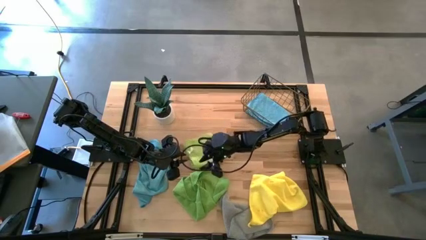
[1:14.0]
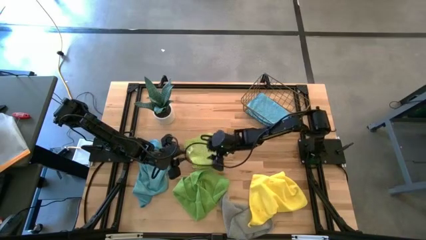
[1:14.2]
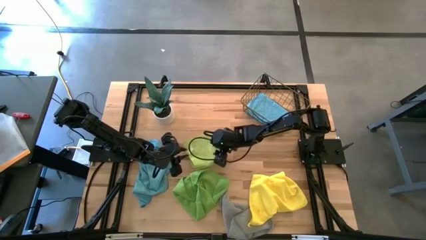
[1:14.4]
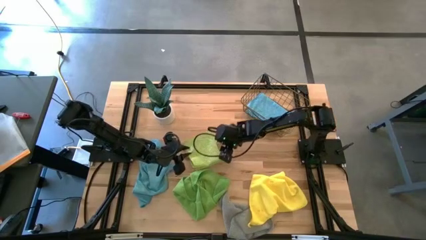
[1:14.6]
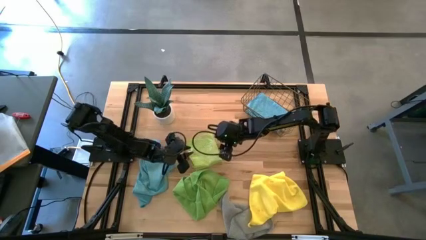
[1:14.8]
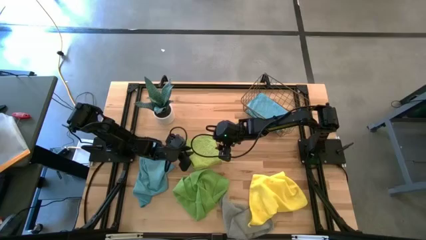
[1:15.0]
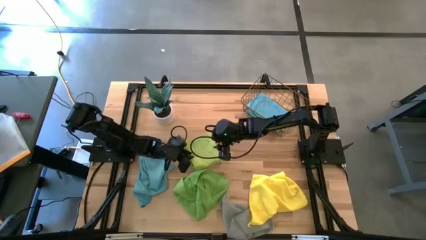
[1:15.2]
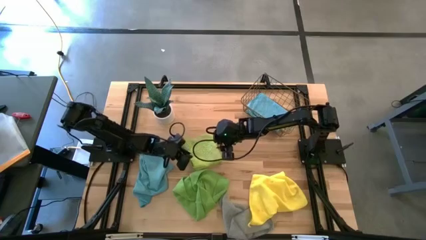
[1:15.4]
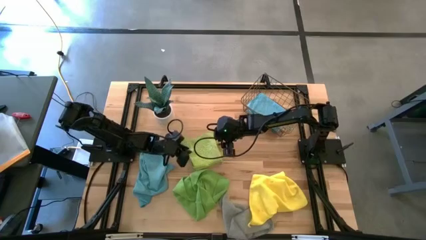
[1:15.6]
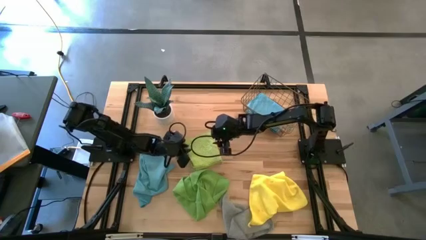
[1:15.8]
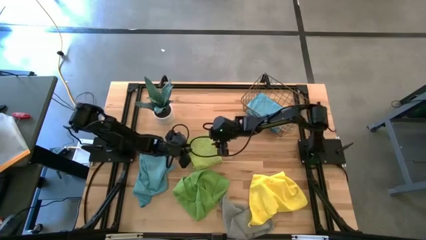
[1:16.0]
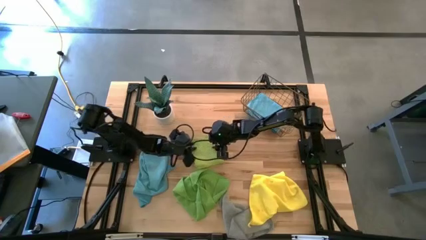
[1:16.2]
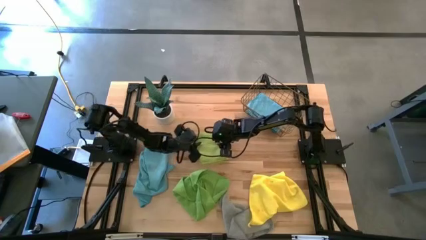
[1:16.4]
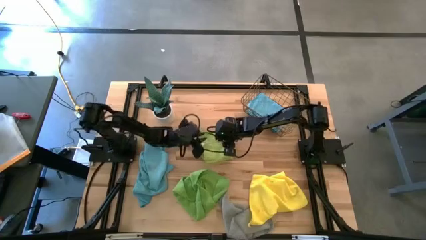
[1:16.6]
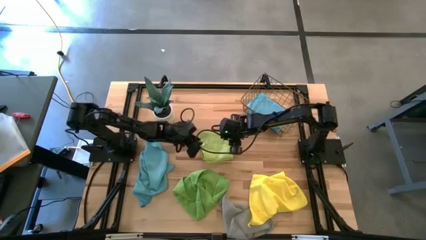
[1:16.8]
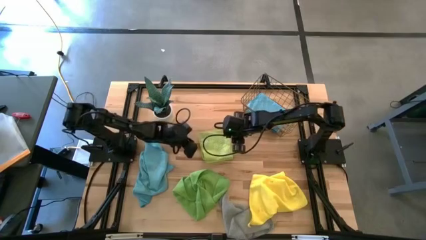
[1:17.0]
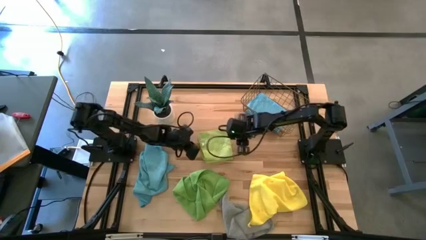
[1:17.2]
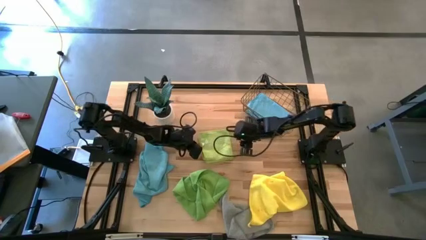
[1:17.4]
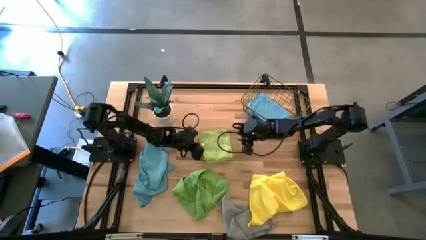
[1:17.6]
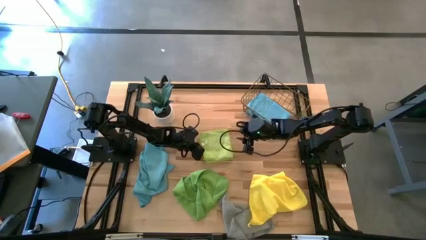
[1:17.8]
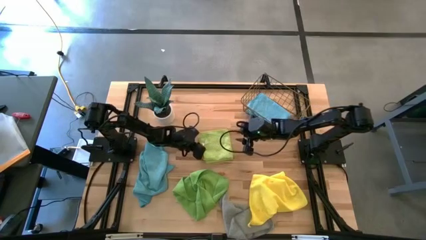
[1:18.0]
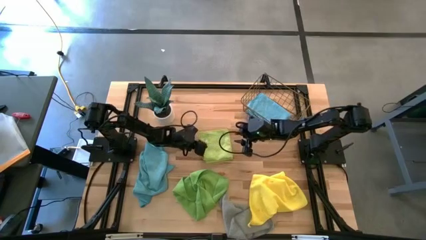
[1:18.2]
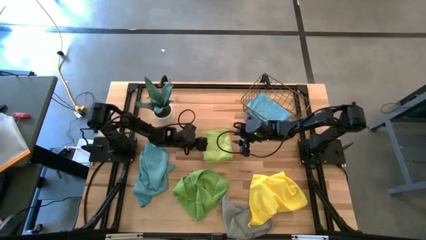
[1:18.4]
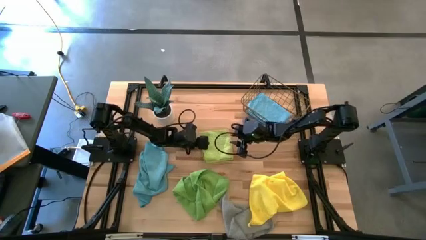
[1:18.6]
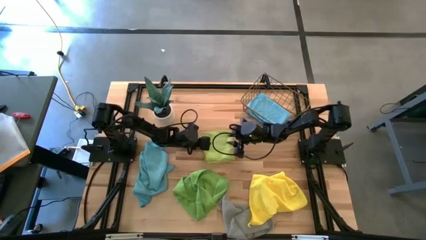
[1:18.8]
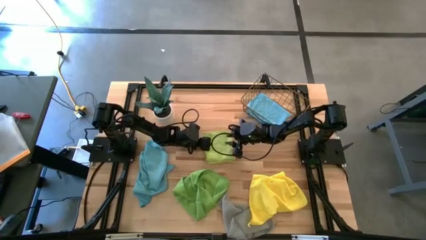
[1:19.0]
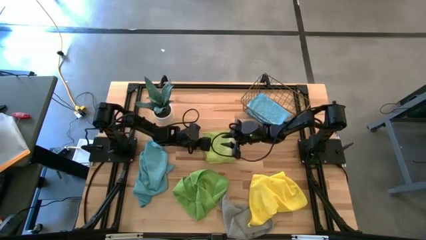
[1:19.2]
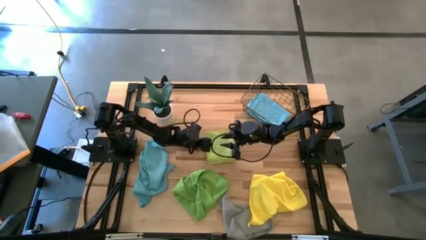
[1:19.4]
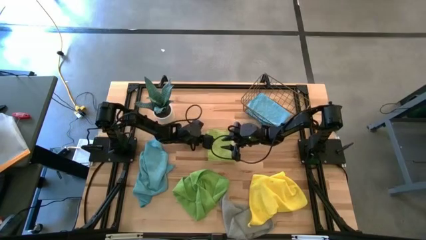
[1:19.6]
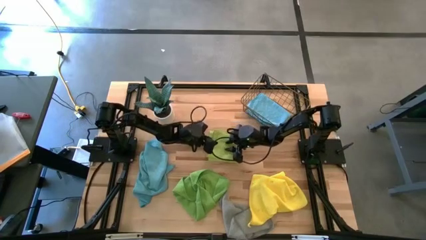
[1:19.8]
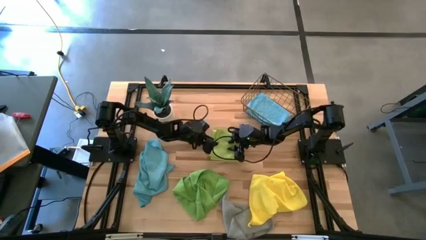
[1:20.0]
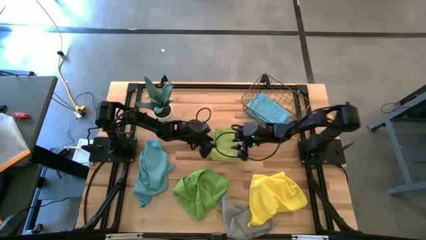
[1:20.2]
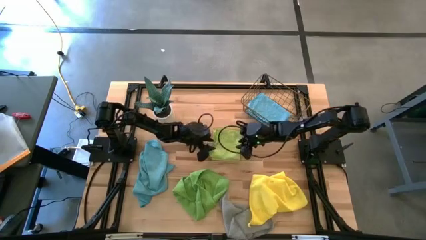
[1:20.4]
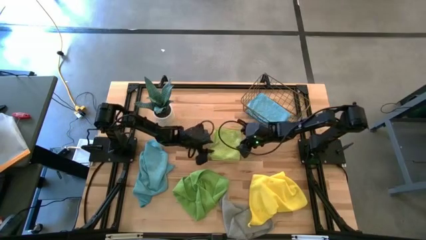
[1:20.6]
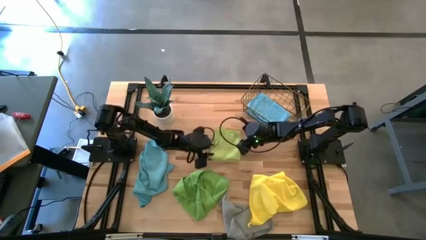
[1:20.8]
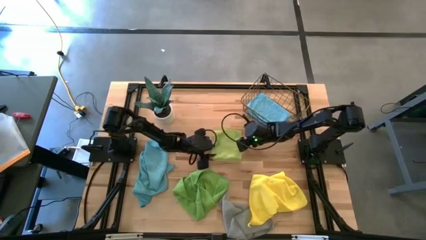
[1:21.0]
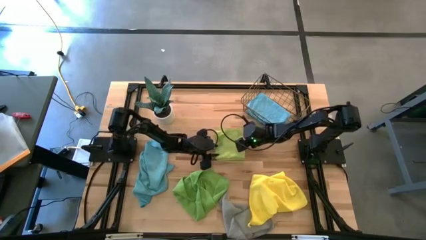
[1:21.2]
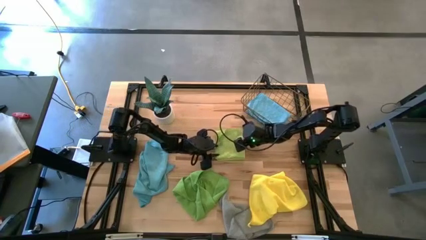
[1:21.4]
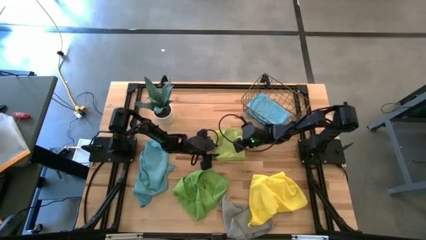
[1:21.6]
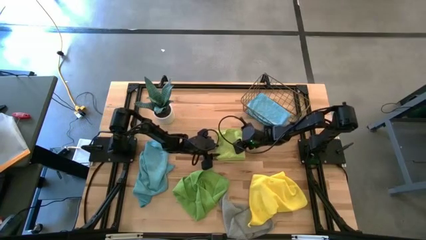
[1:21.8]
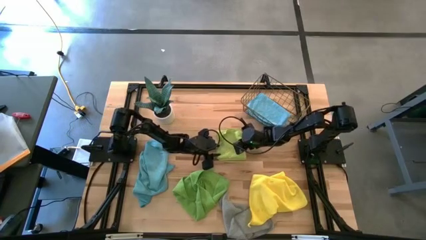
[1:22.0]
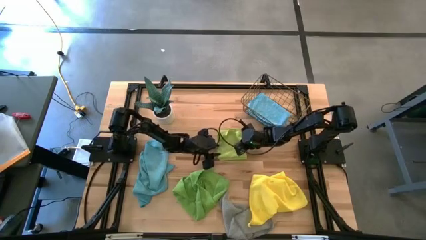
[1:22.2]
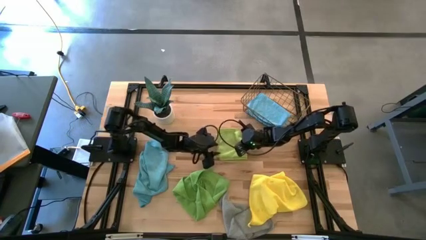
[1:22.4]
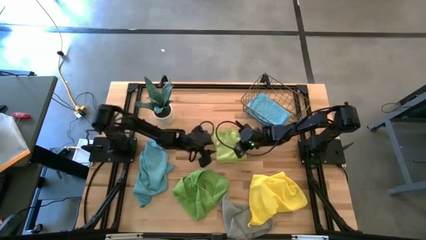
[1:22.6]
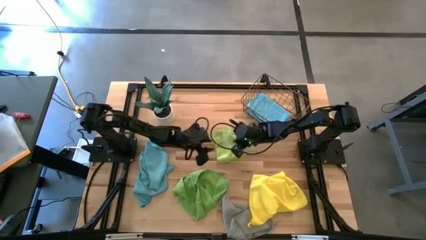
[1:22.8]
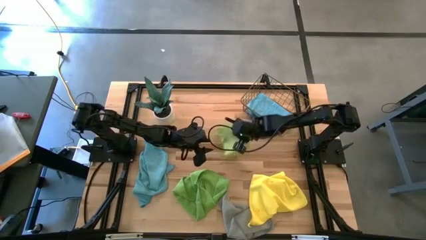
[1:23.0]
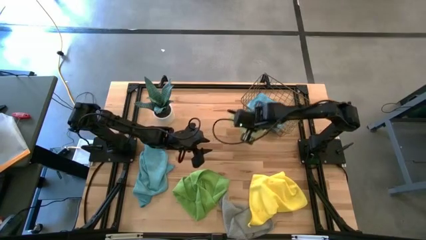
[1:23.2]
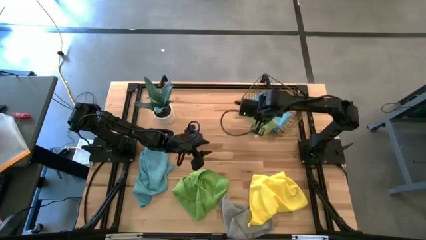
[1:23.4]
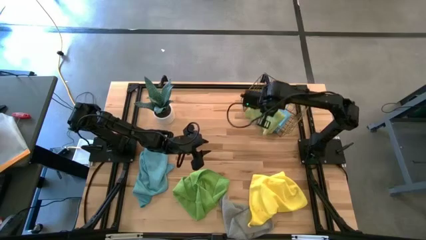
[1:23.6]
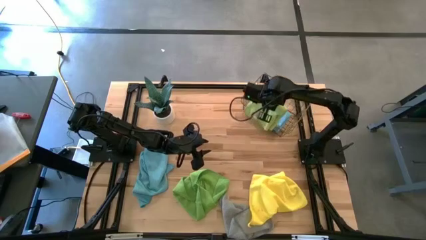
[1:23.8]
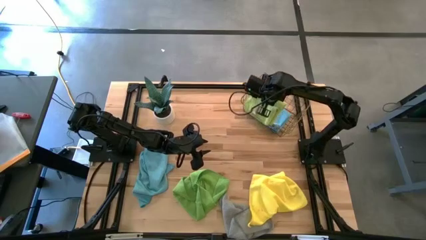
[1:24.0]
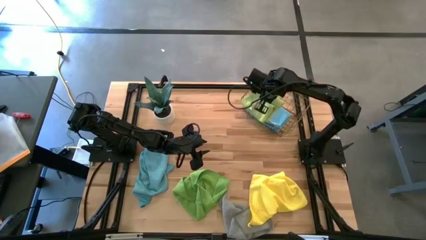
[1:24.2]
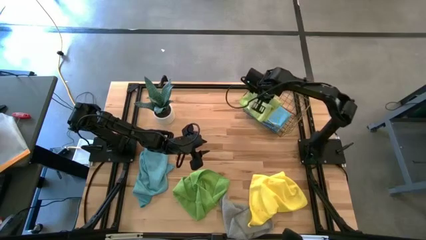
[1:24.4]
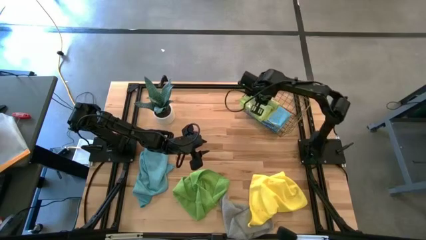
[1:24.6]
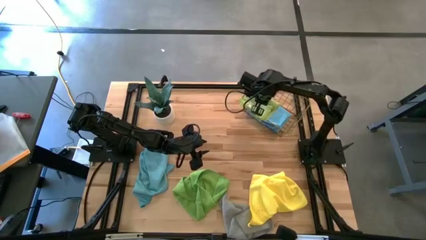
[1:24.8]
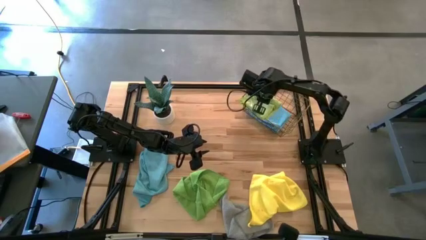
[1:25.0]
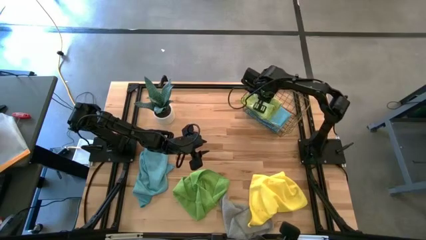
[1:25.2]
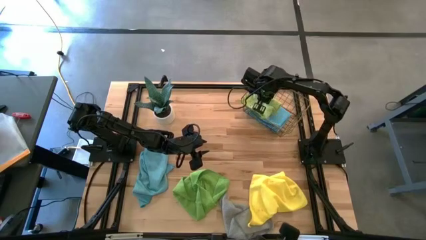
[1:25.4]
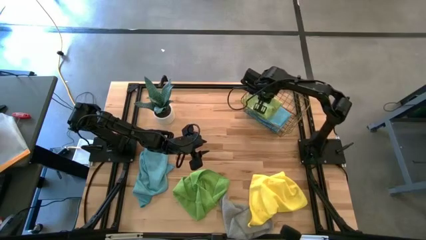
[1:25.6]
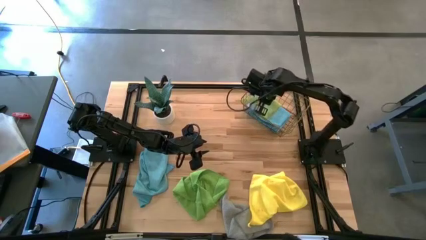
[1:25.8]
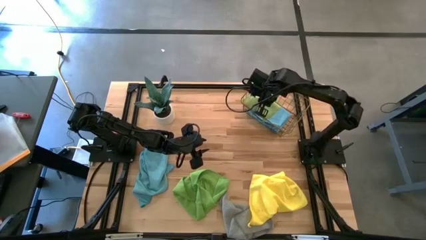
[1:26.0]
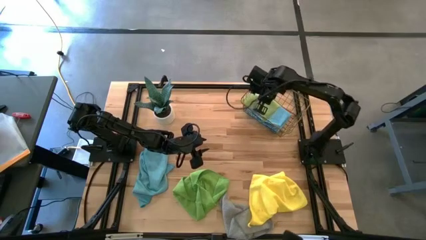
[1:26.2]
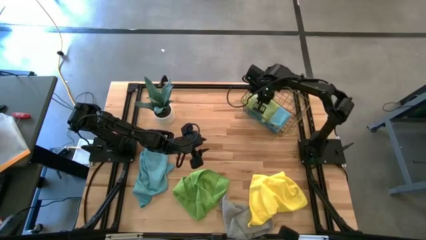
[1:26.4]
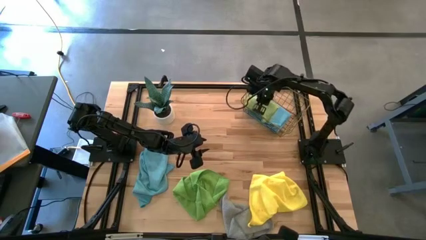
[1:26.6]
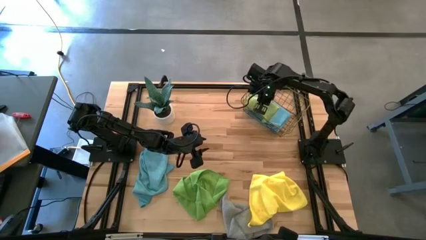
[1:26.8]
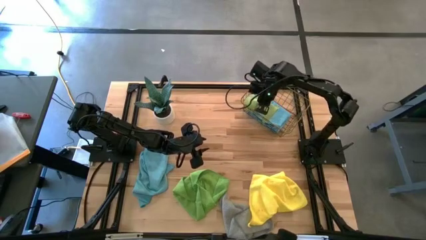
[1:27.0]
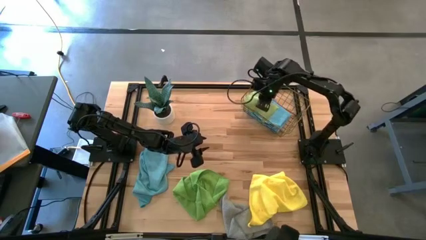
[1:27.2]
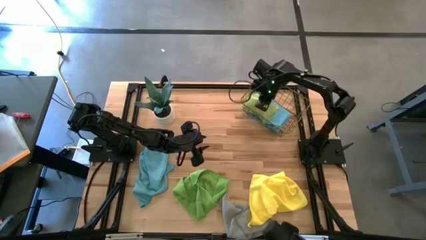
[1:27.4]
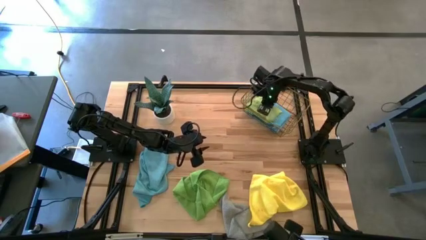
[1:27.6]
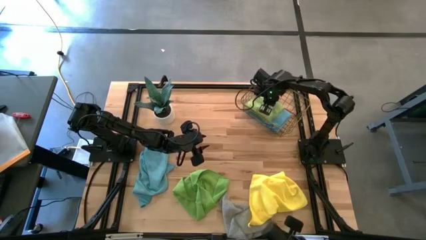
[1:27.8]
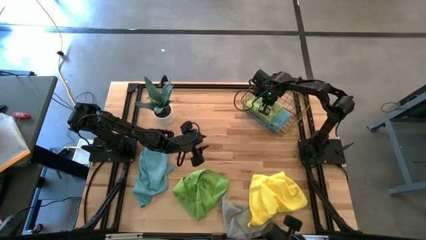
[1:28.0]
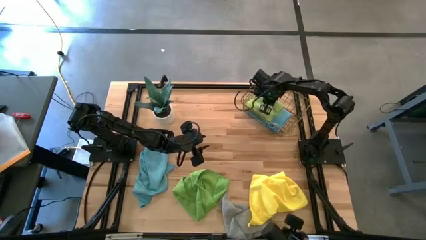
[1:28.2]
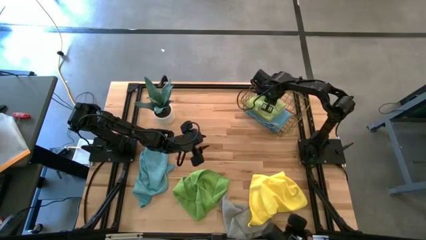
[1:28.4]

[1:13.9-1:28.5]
Task: Fold microfiber towels
Put the light green towel into the wire basket
